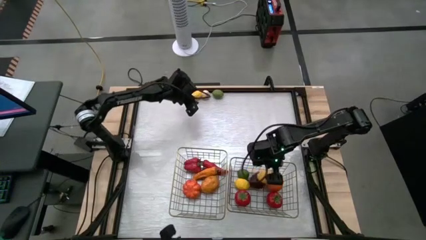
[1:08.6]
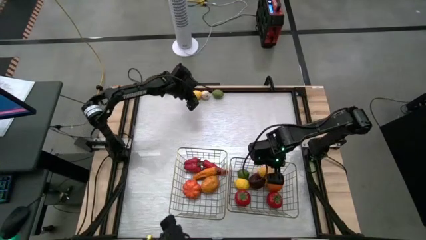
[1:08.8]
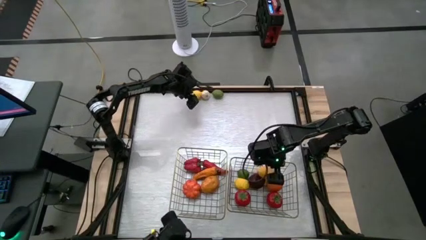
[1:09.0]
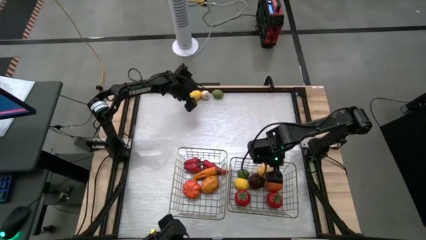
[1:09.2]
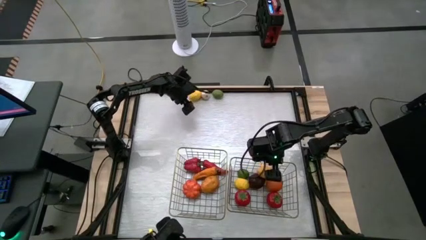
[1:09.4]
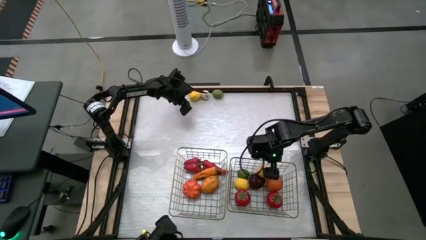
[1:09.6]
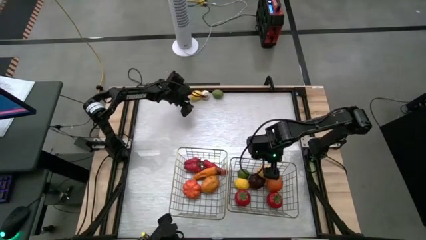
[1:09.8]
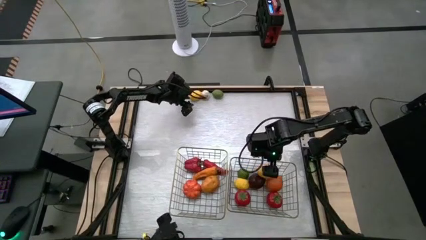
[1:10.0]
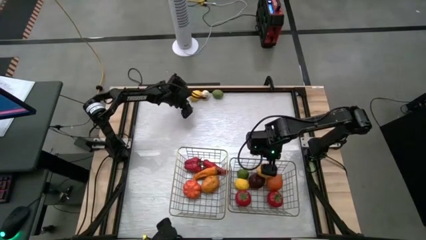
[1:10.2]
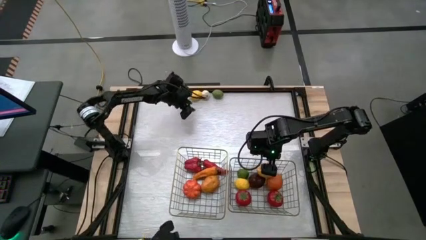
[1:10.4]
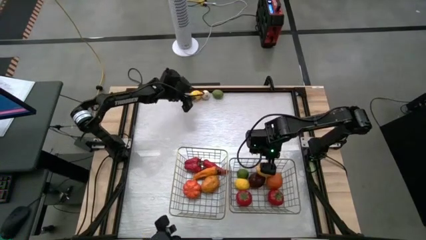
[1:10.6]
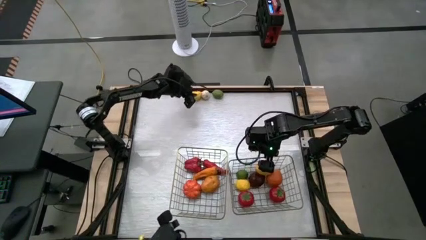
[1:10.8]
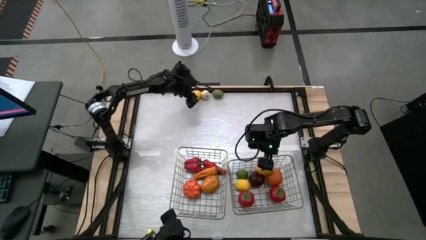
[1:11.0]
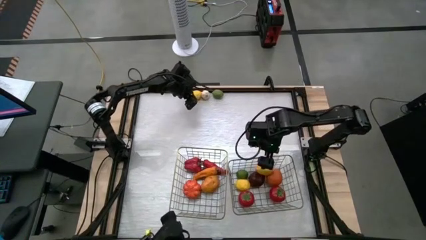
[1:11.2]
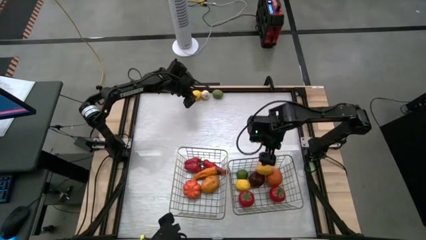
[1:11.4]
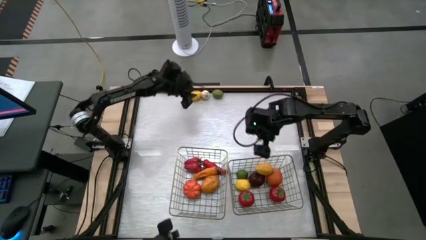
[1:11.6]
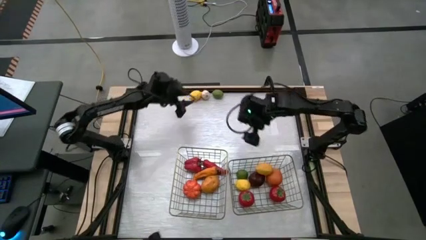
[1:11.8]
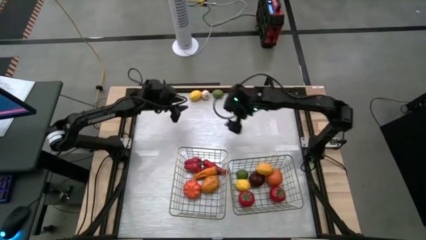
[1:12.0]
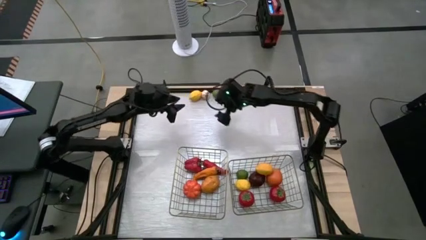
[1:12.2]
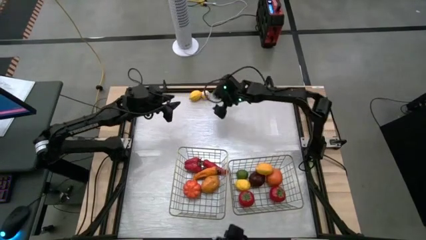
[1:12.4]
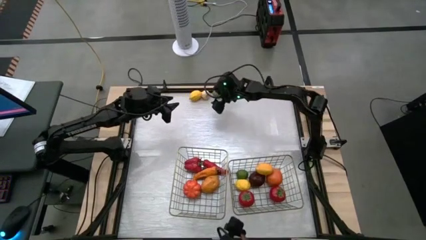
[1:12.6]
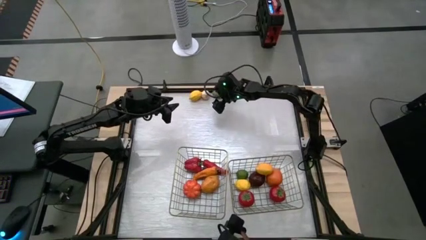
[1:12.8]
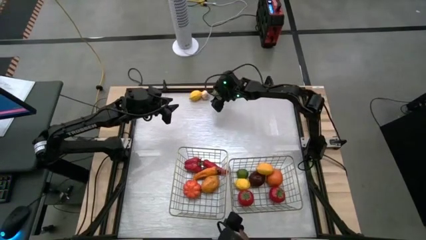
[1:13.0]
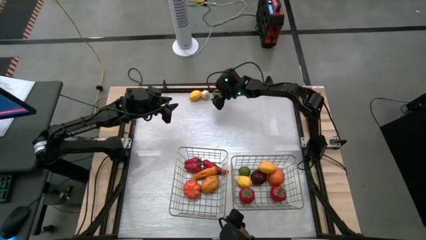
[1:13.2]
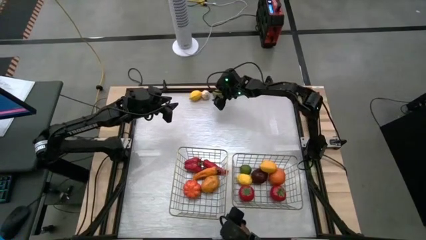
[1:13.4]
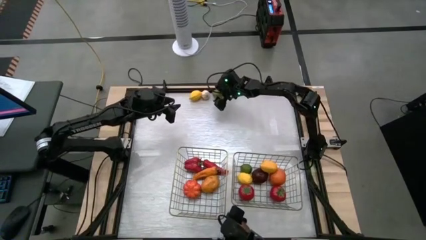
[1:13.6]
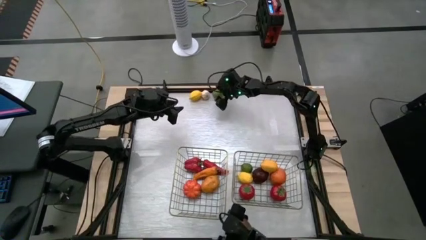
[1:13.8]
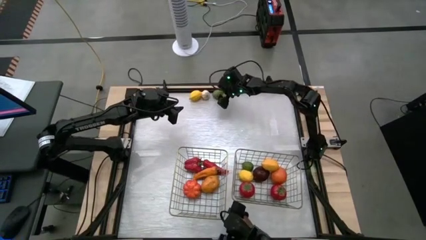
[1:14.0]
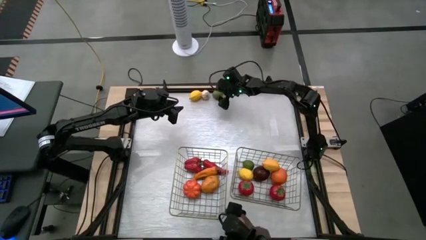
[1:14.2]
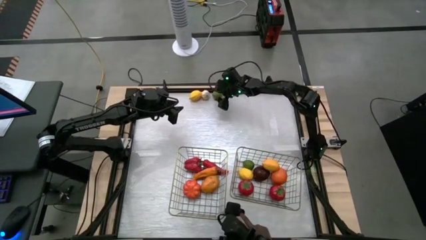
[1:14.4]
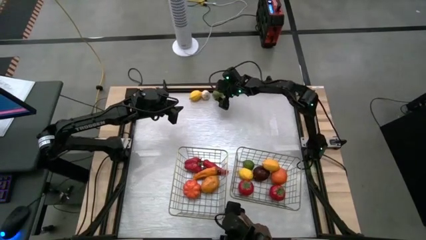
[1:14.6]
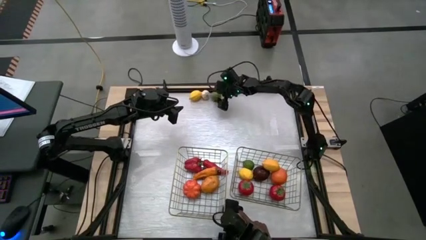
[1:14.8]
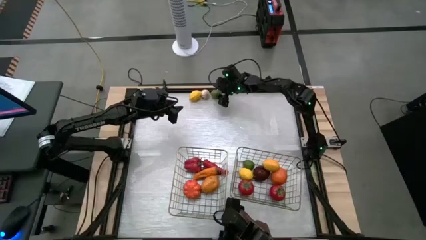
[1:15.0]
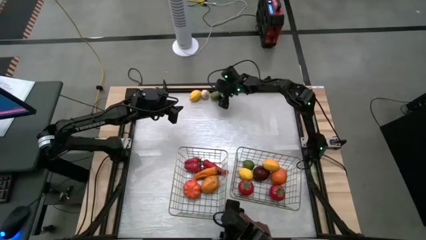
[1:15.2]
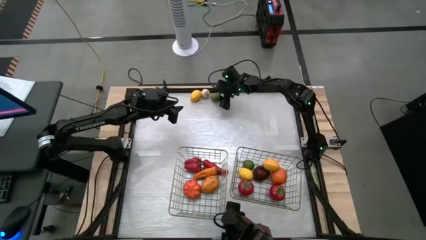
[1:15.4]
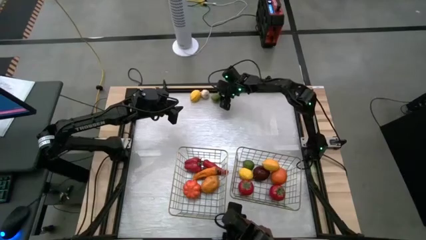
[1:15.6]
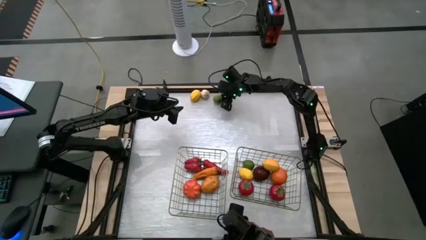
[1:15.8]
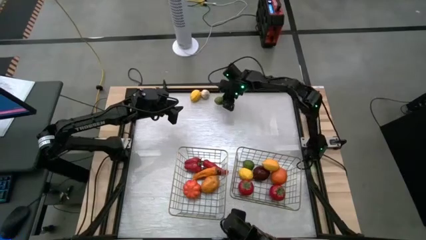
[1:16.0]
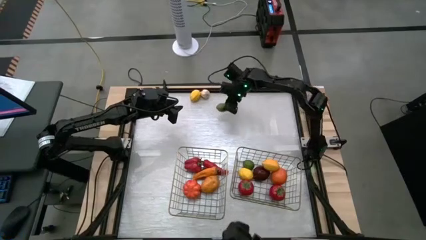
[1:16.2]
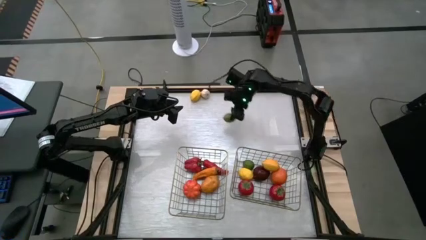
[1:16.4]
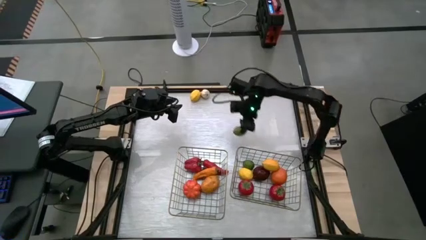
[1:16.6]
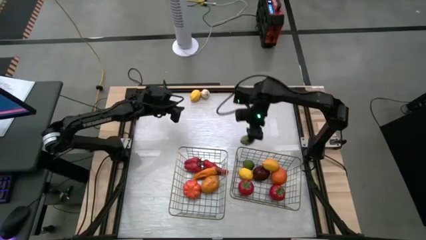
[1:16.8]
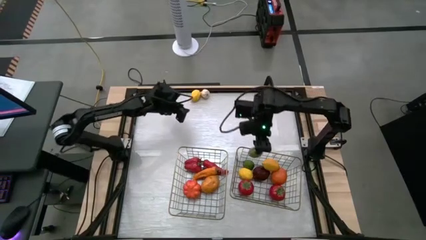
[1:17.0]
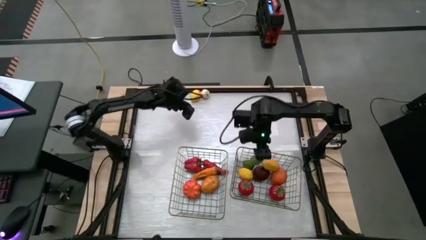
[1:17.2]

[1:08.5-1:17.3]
Task: Sort produce into baskets
Put the green lime into the right wire basket

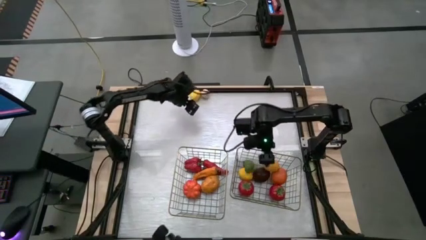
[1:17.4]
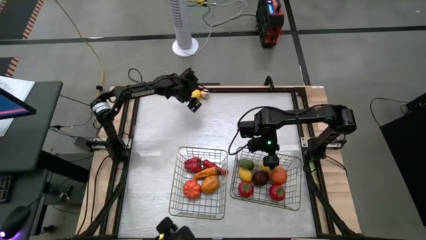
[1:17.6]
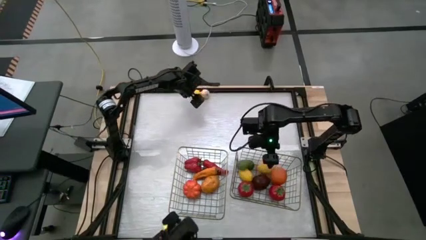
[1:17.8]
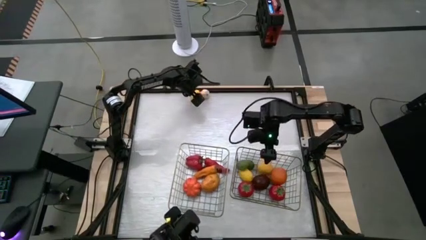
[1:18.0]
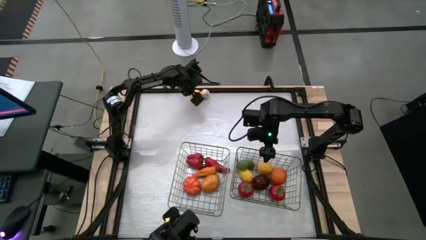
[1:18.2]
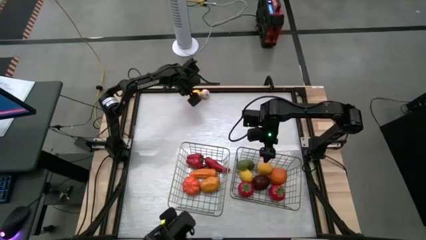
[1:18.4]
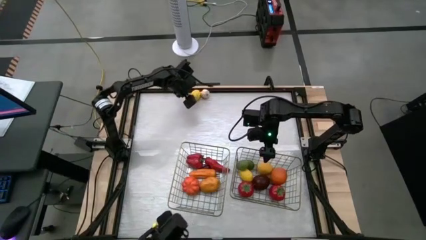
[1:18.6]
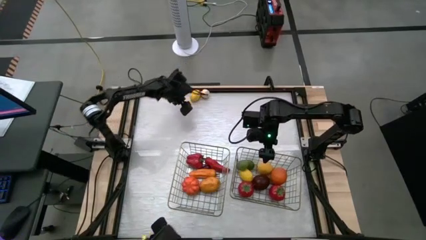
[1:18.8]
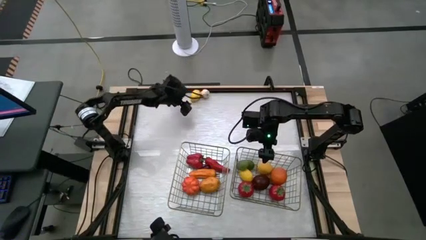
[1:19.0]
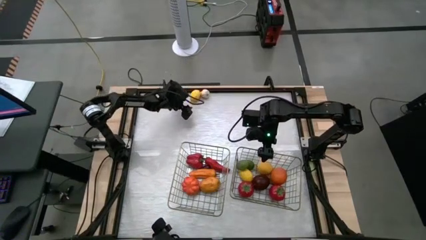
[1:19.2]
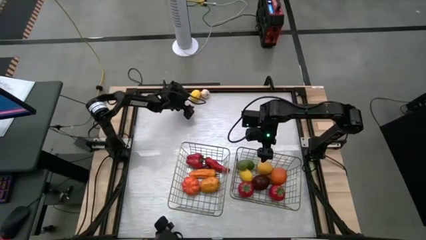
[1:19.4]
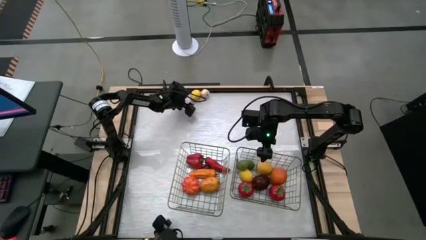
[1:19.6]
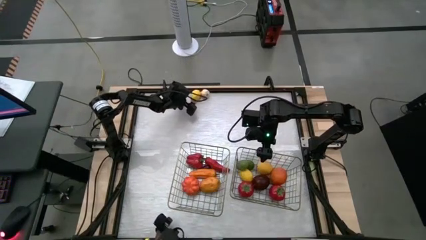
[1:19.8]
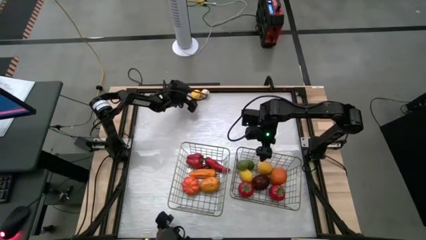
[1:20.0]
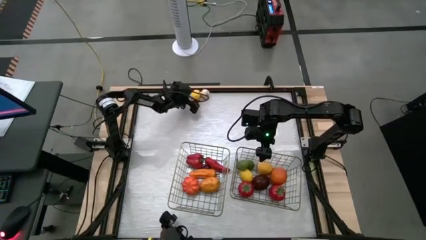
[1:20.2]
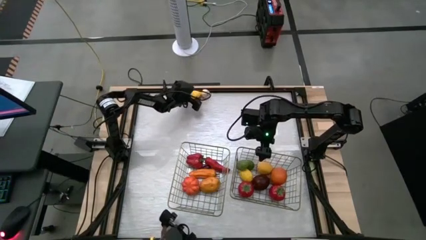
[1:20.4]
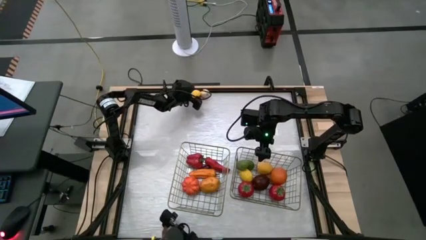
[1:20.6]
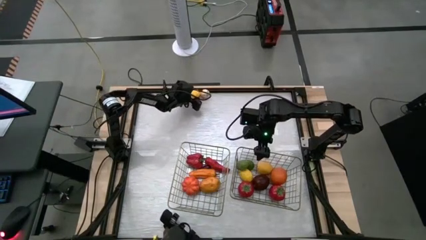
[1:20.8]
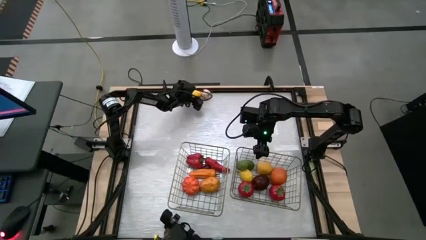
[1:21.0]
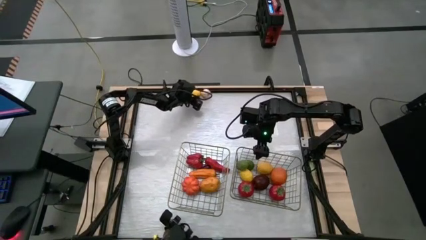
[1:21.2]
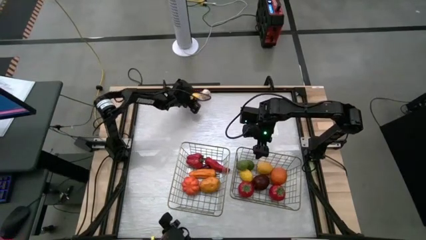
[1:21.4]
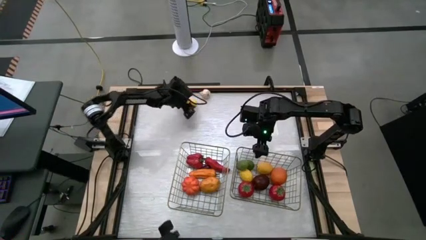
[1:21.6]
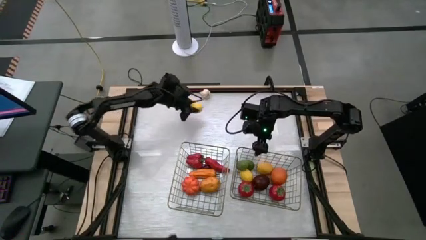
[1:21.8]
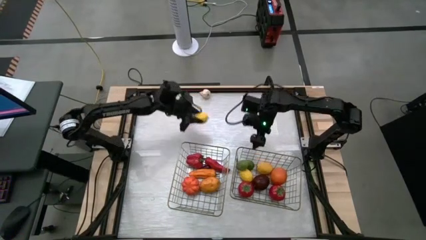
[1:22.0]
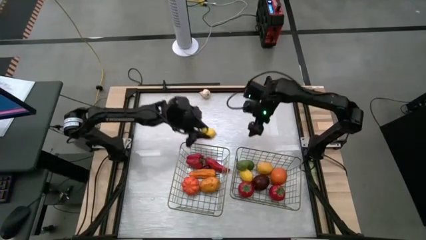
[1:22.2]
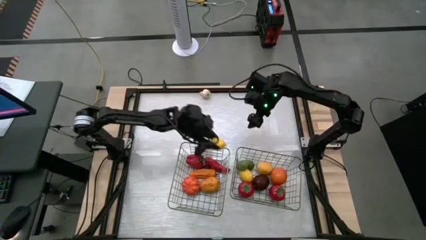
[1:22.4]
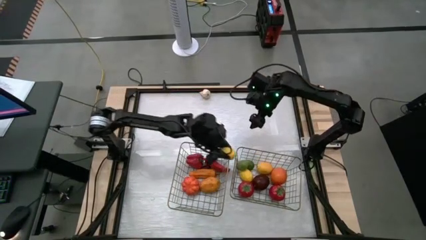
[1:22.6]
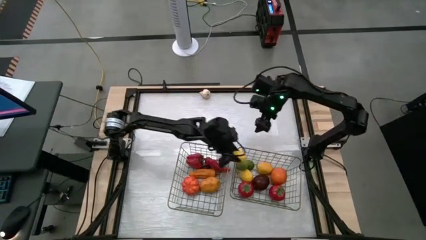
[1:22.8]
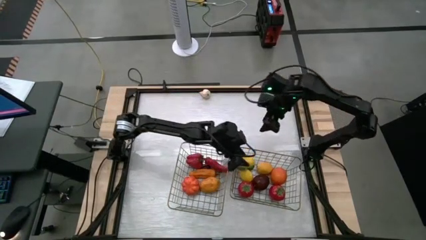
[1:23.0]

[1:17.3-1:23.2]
Put the top left yellow lemon into the right wire basket

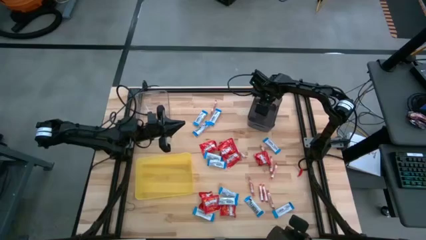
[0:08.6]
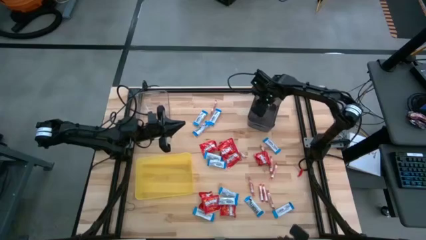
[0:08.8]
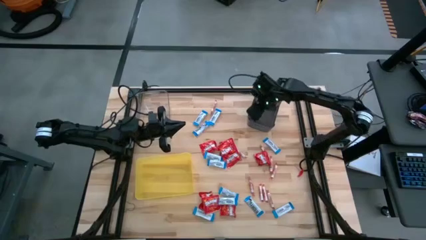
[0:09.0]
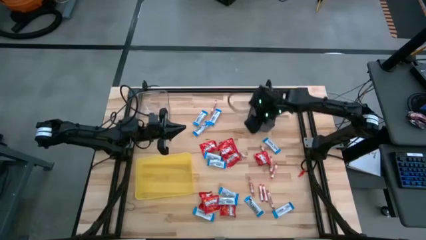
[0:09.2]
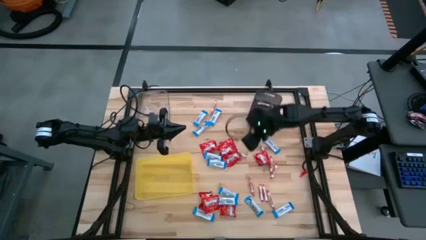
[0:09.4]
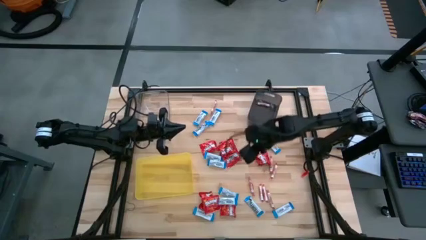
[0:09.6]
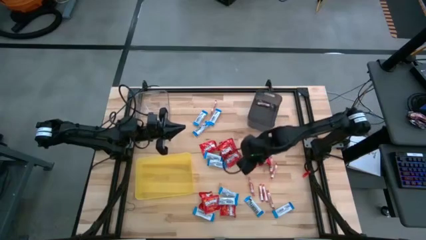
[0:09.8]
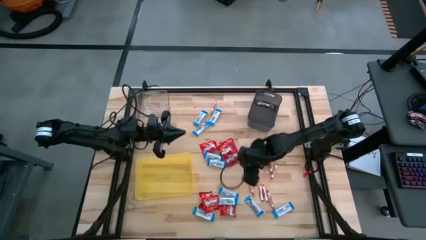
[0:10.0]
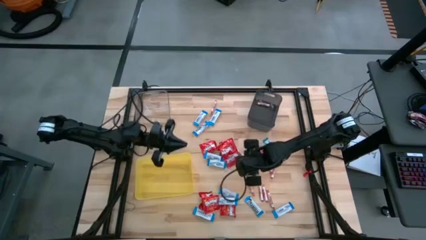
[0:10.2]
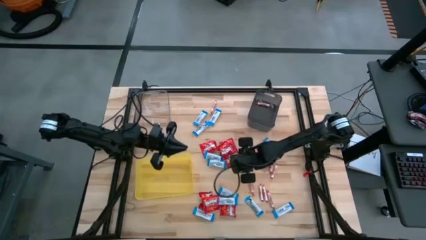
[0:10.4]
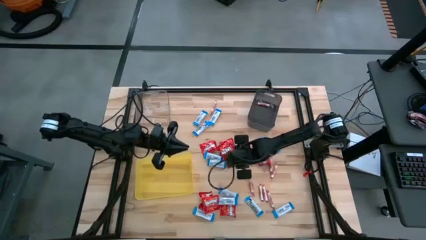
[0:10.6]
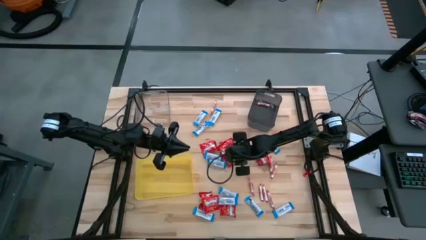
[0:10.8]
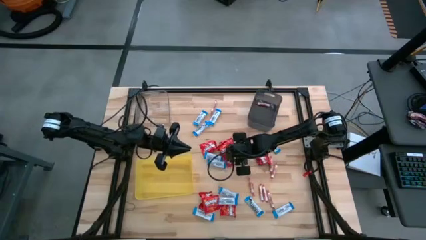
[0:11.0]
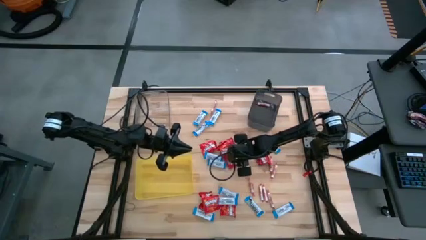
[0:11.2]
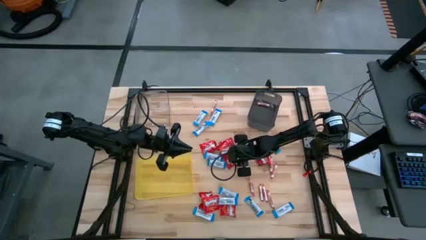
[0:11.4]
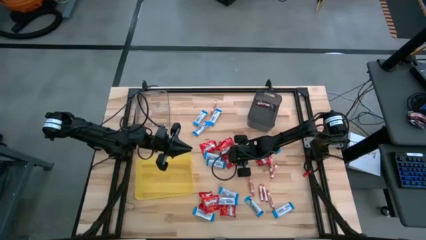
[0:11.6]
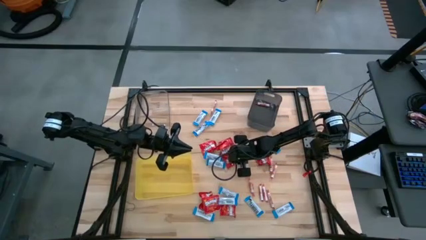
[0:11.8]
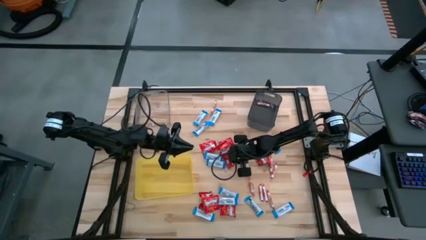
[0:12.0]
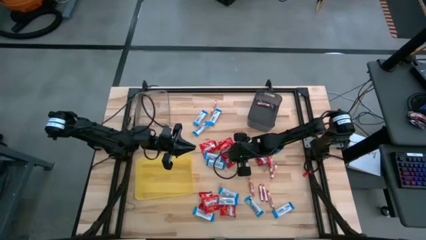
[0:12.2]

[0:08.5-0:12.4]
Task: Sort candy
Put the red chocolate into the yellow bin
